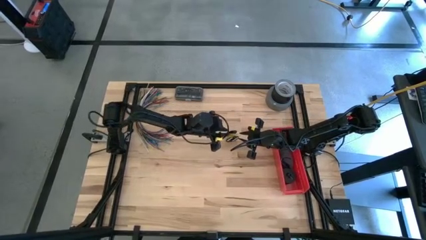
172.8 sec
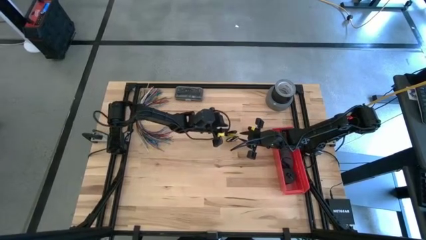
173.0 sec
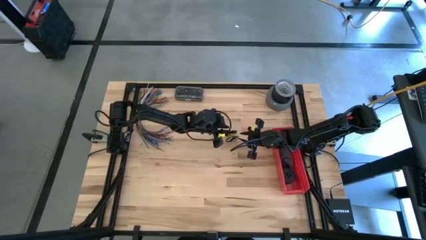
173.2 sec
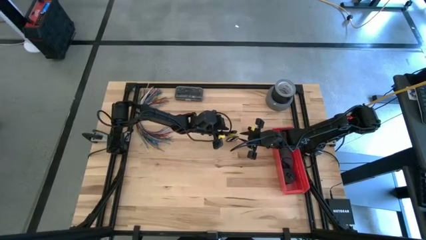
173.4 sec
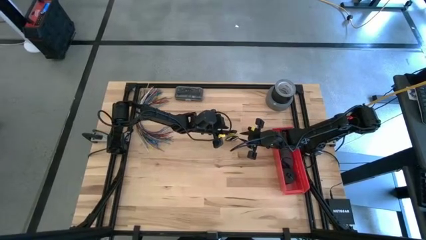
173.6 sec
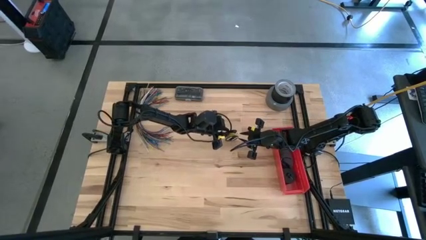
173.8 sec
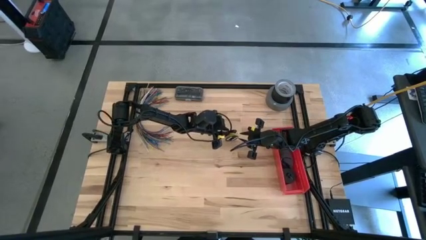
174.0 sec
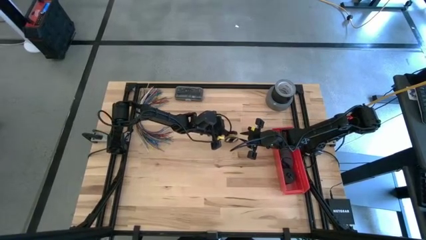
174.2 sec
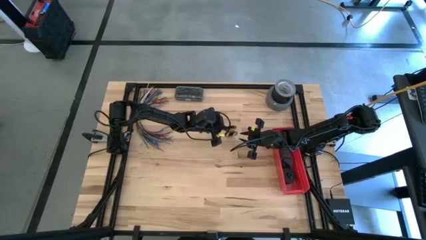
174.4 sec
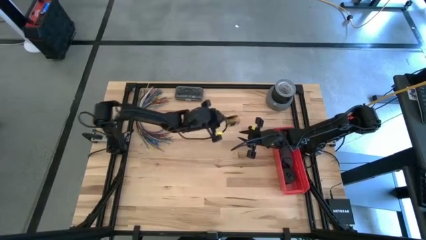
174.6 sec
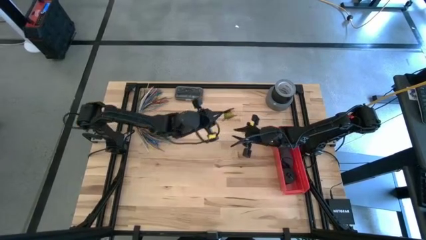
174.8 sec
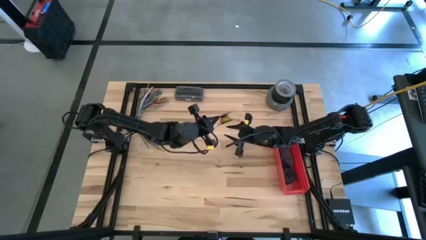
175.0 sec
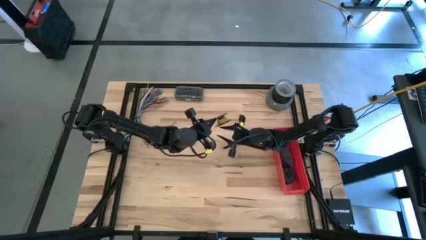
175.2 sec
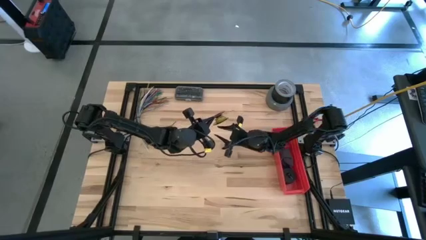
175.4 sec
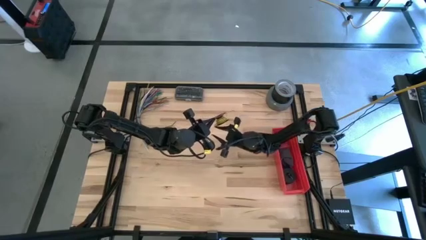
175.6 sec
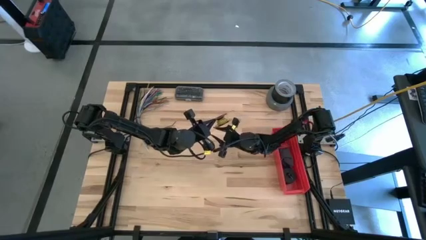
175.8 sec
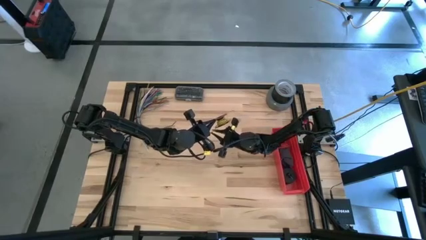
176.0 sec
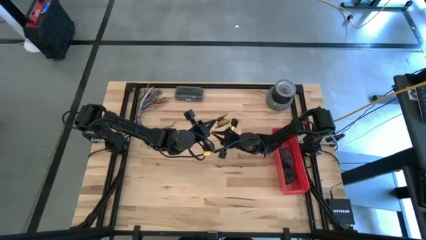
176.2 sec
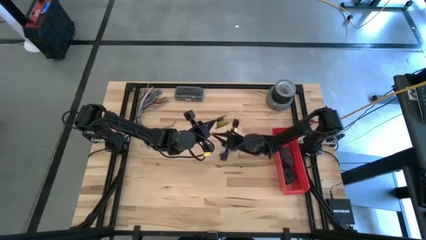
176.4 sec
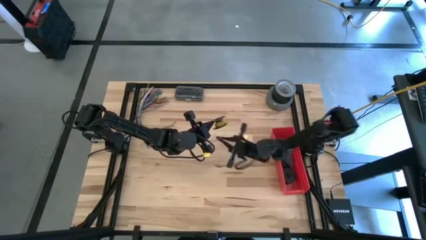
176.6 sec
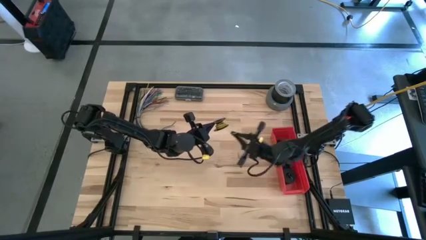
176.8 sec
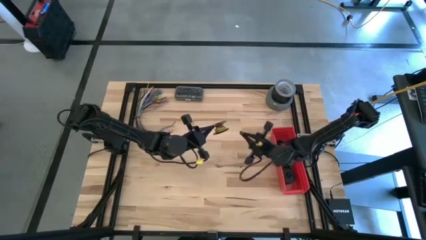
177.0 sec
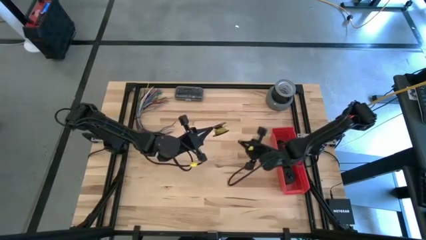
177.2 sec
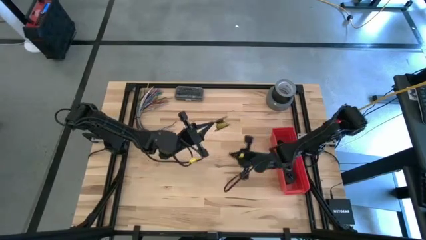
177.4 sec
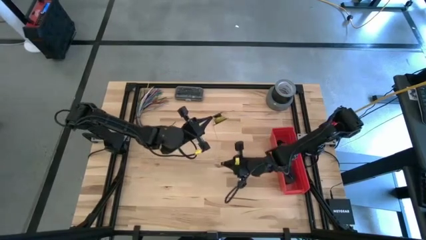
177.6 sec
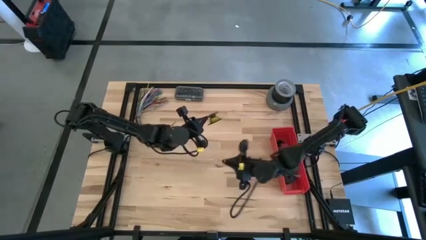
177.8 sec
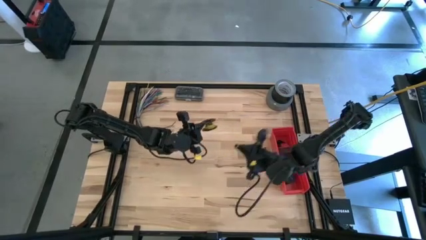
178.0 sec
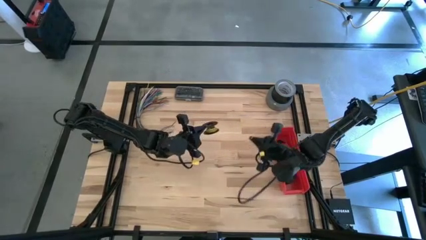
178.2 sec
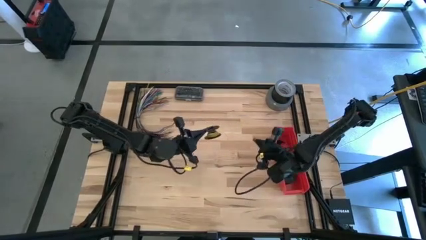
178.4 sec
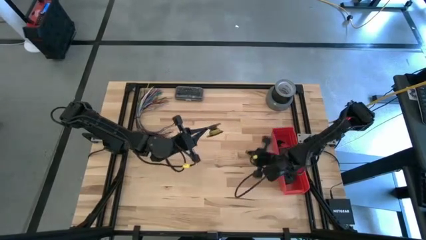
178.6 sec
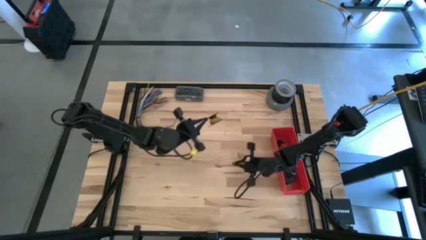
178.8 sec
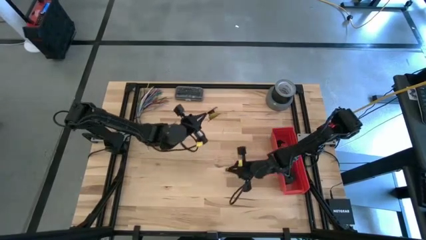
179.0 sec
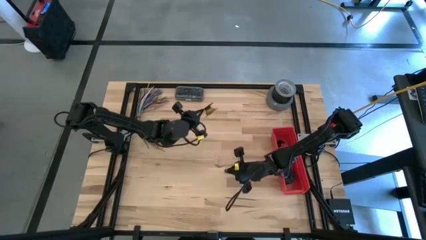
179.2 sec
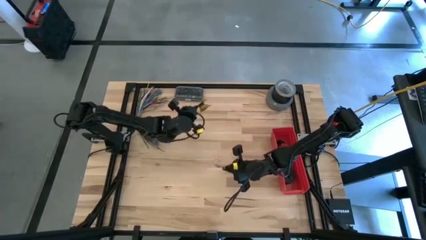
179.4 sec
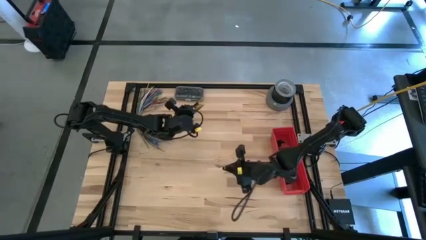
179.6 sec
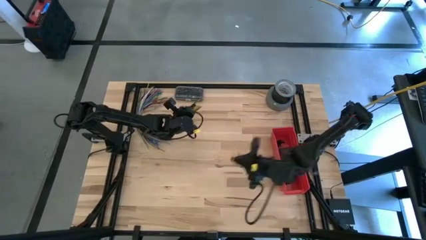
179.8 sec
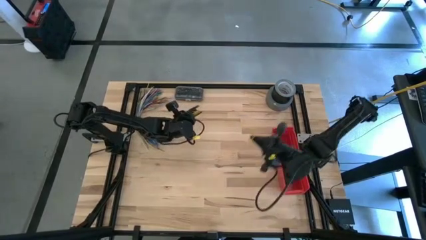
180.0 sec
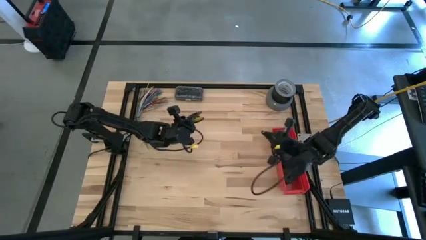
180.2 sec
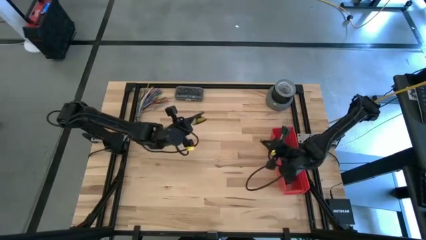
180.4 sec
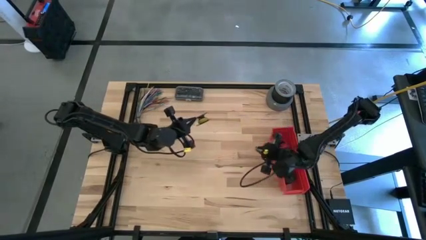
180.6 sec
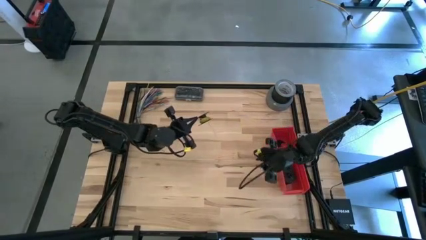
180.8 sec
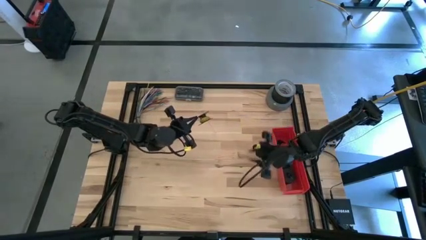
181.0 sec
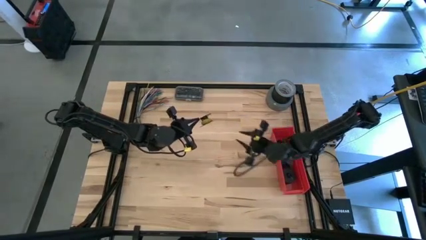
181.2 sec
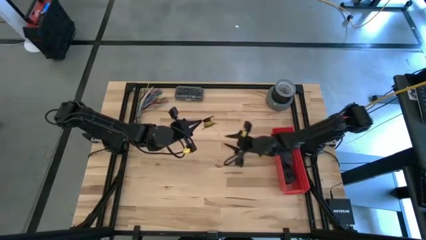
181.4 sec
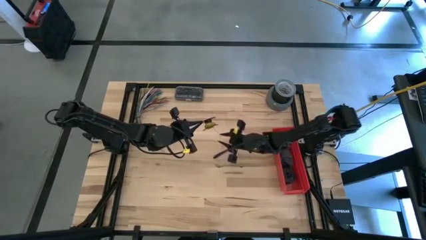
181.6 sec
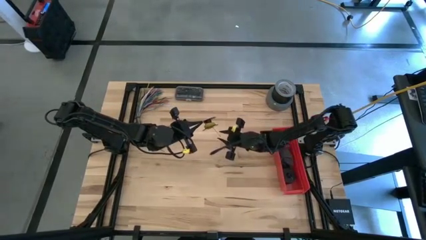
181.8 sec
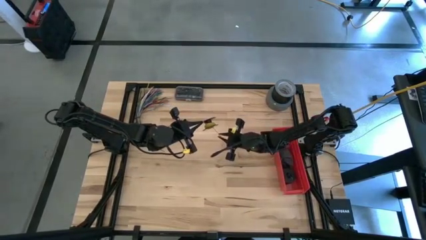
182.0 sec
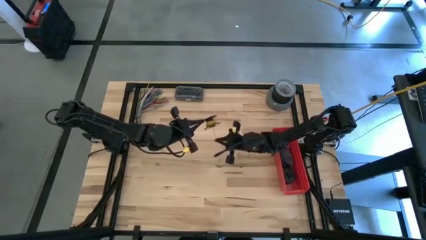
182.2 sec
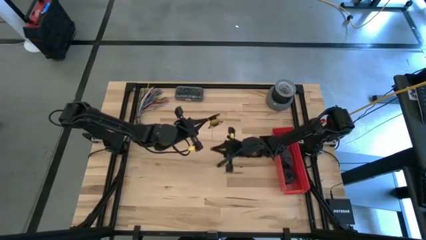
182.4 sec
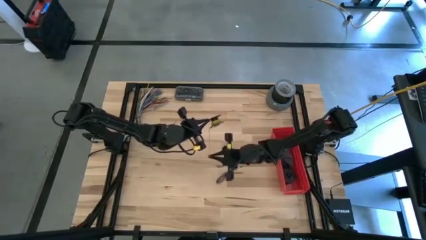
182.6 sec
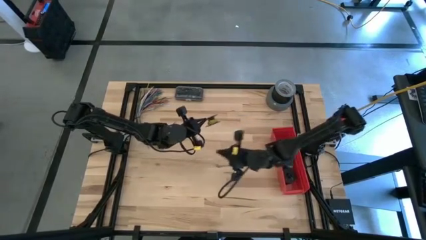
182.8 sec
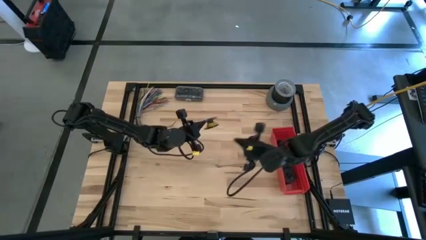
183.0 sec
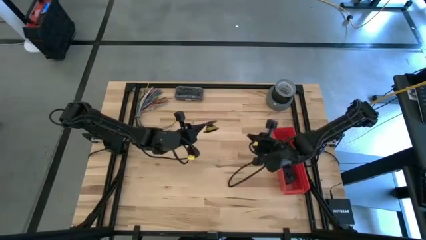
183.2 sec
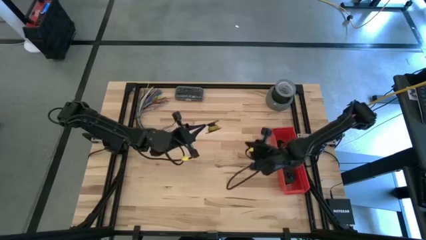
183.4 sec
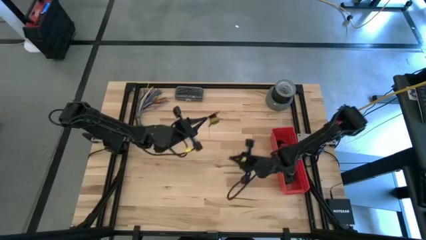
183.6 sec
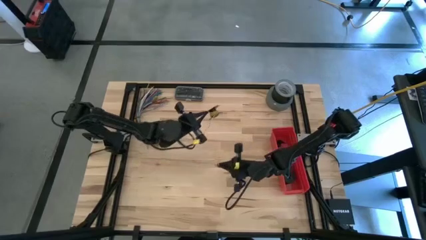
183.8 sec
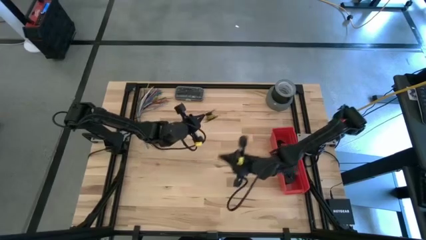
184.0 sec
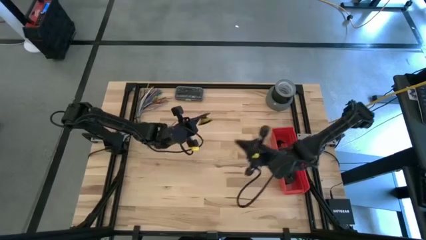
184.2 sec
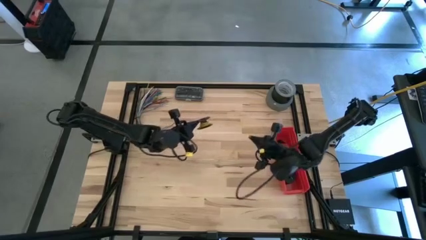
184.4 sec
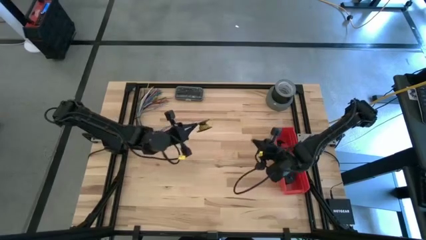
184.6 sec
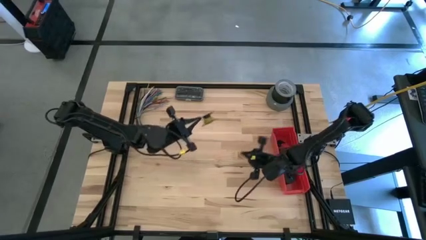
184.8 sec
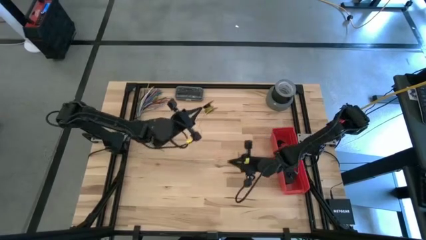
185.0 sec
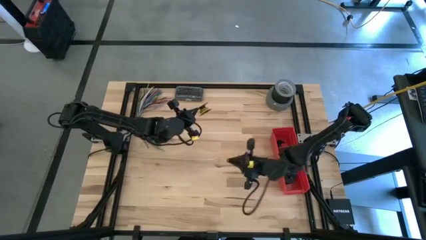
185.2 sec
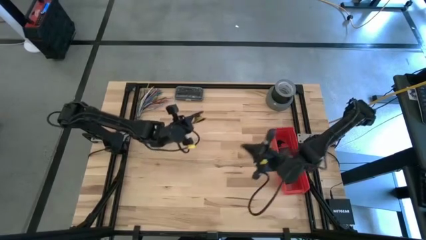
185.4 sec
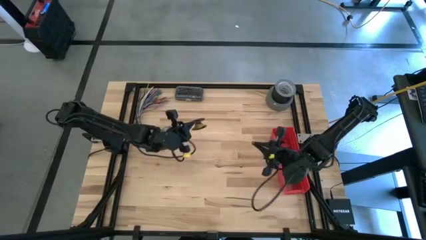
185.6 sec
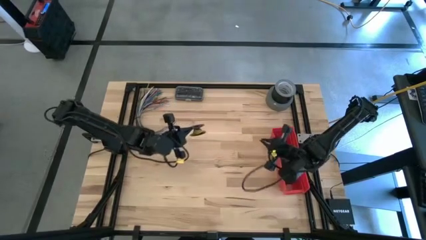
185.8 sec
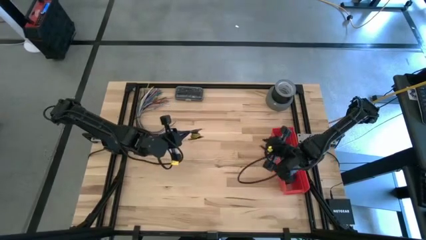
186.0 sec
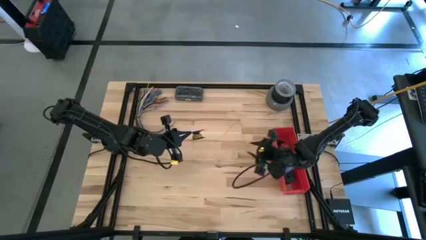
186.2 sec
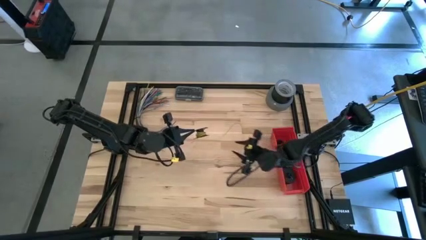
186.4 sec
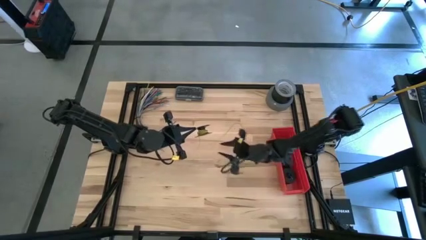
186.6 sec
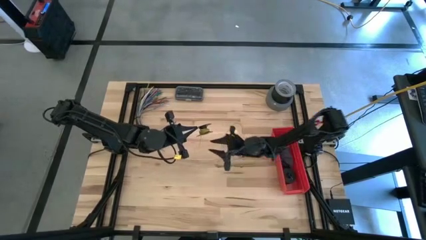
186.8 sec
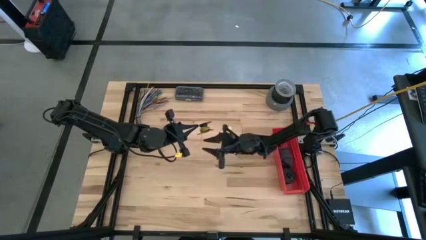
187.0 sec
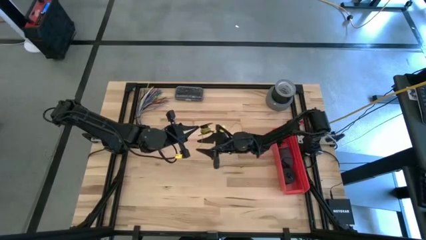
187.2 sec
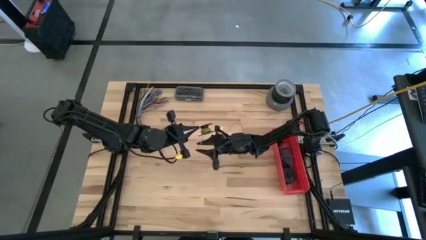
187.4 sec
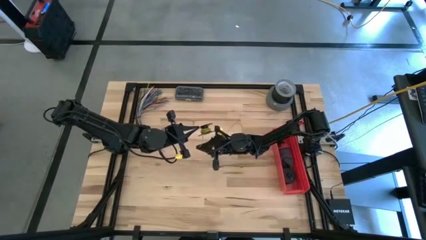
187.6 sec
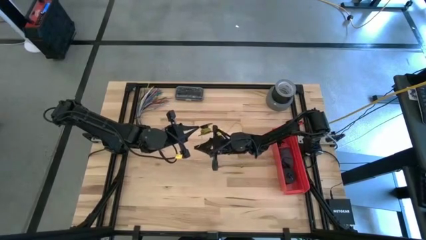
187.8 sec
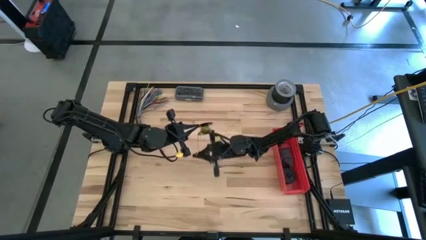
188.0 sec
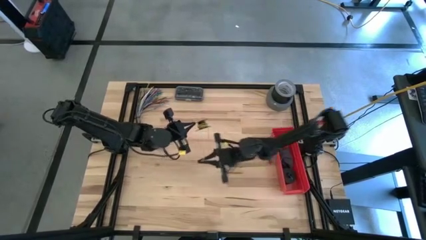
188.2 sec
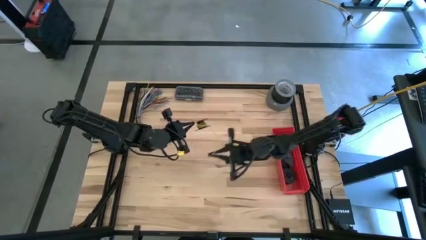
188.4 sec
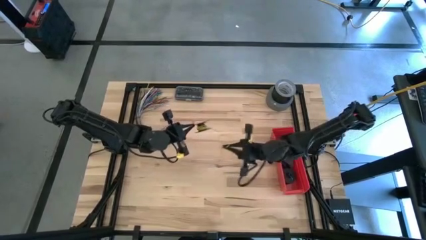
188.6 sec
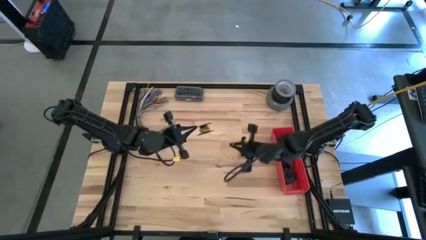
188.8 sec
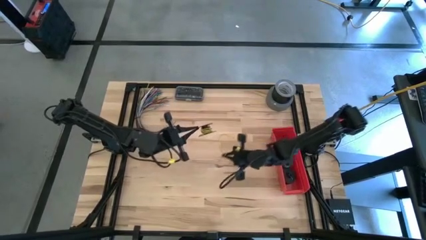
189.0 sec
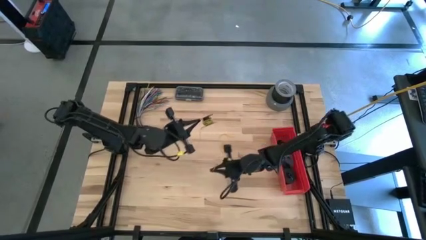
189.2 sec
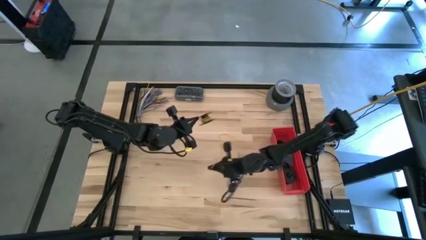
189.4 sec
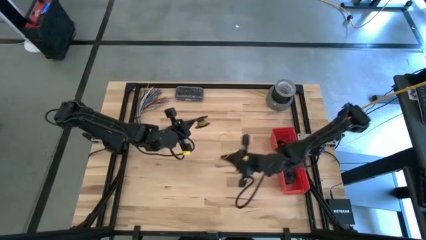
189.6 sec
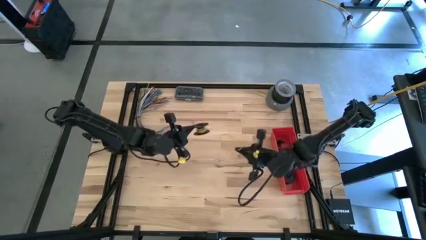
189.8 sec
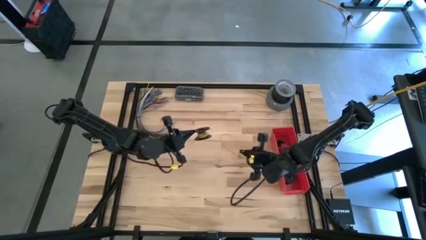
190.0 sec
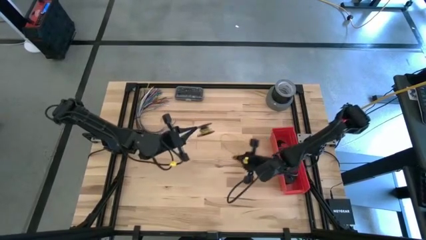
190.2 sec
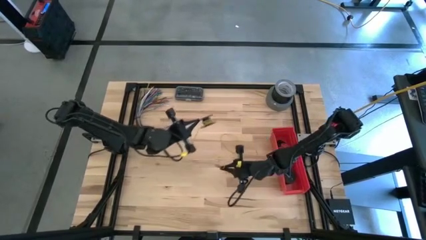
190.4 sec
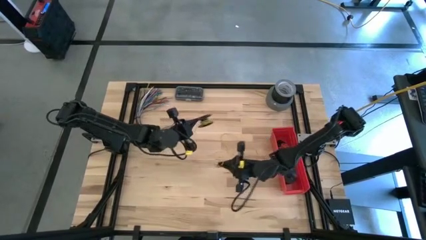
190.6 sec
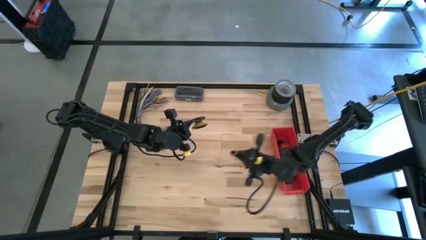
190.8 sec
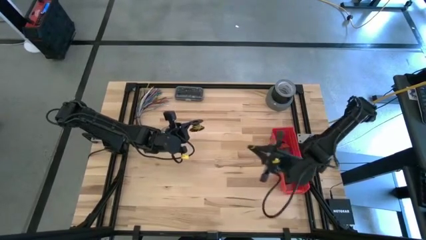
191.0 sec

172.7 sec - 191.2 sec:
Task: Coil cords
Uncoil the yellow wire from the black spool
